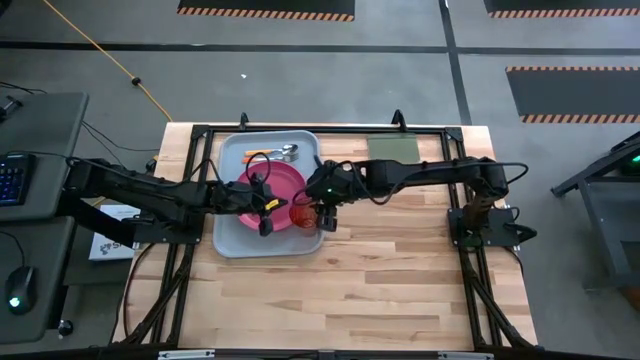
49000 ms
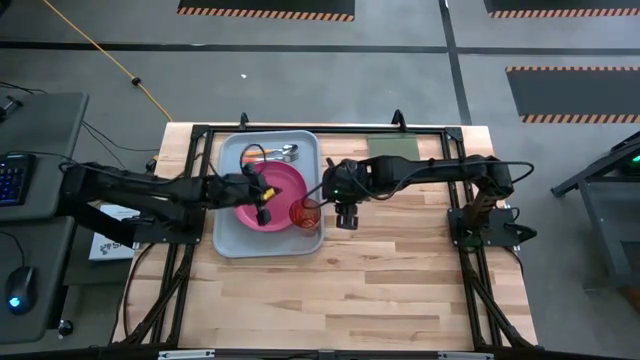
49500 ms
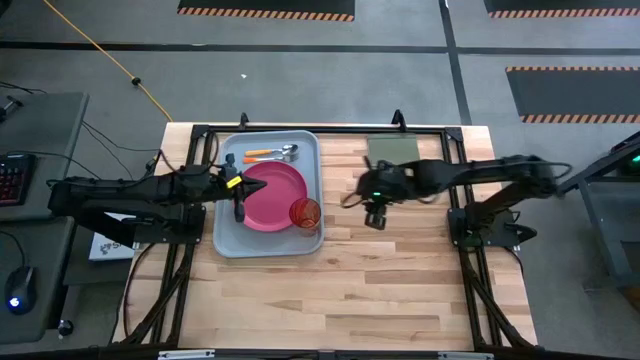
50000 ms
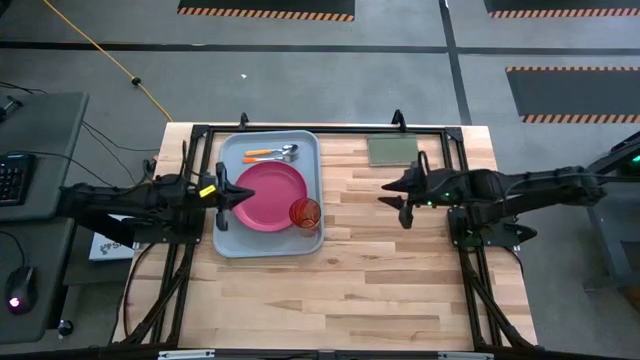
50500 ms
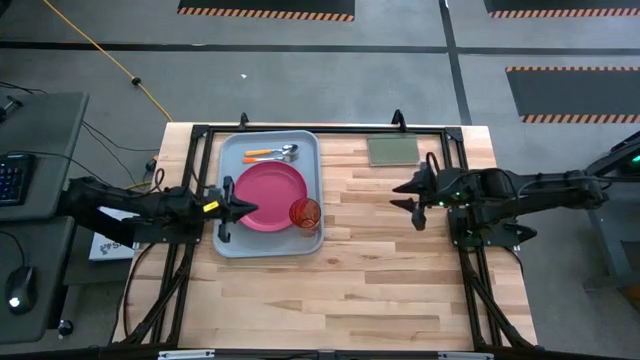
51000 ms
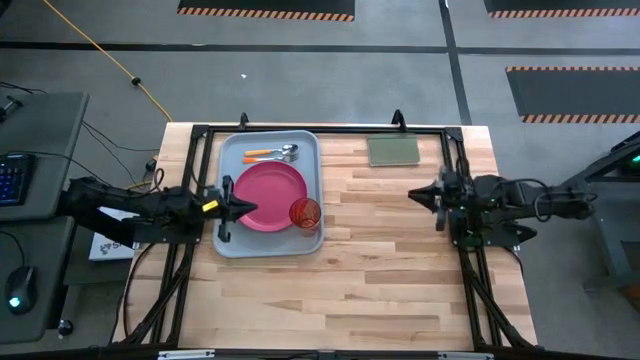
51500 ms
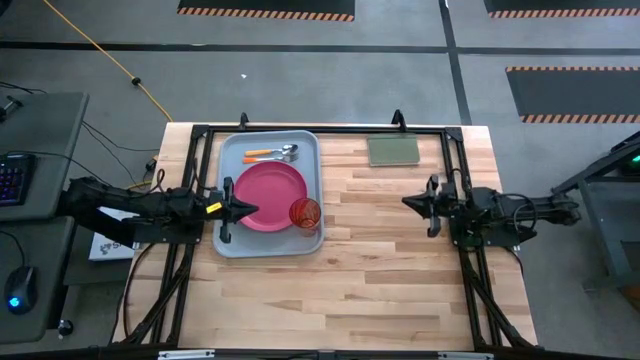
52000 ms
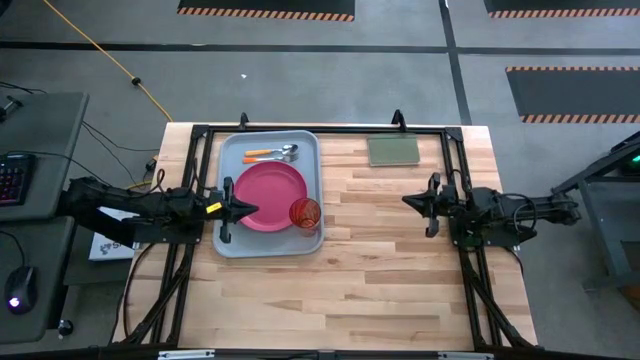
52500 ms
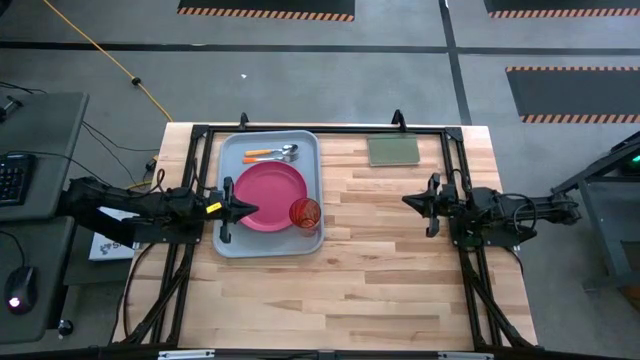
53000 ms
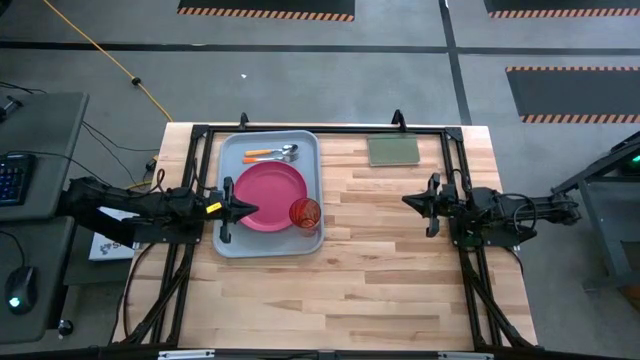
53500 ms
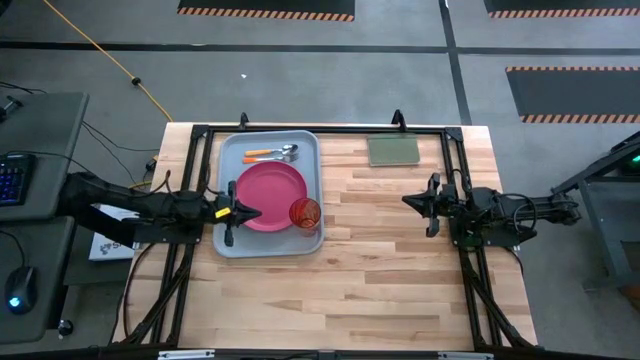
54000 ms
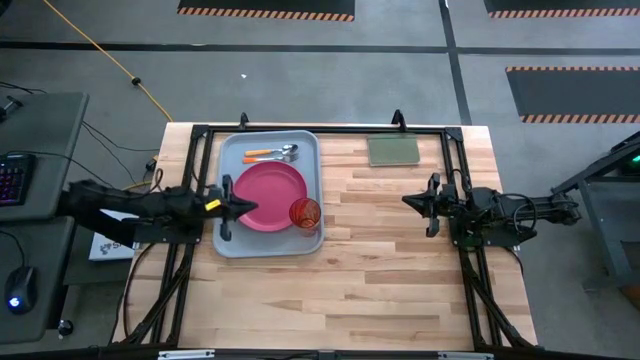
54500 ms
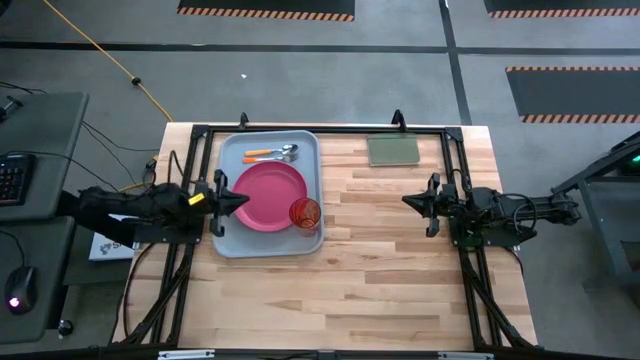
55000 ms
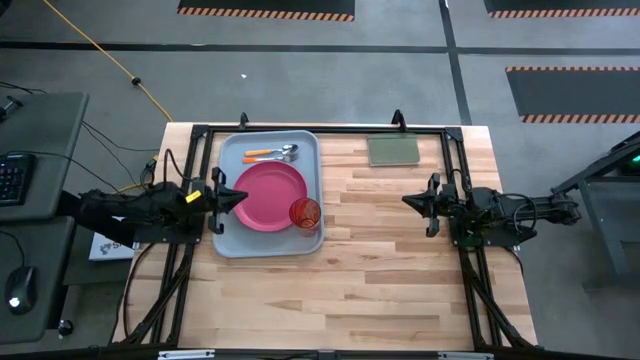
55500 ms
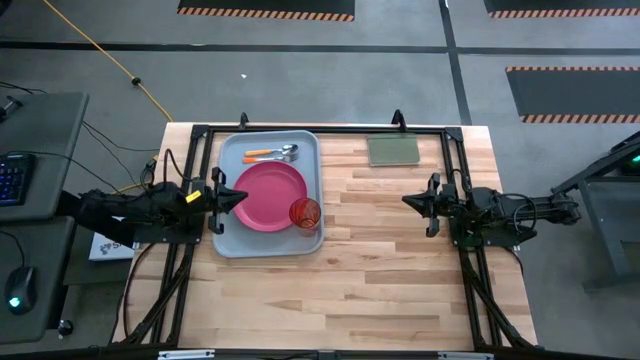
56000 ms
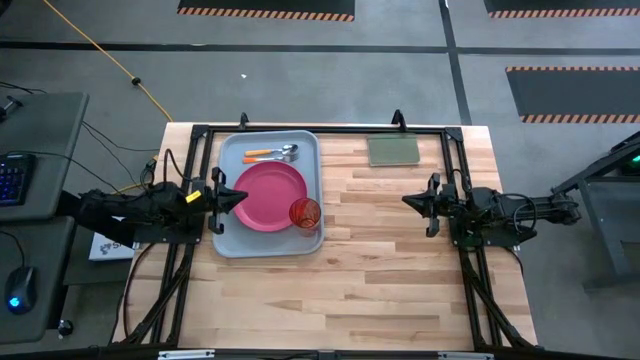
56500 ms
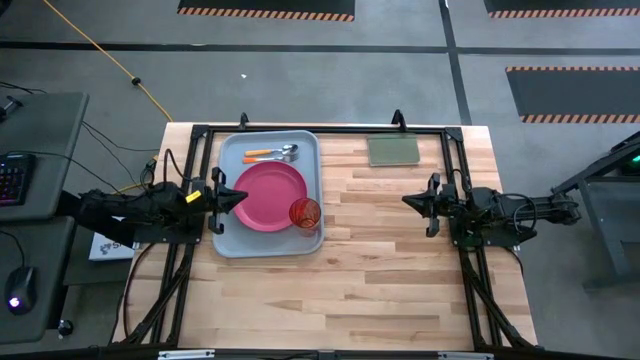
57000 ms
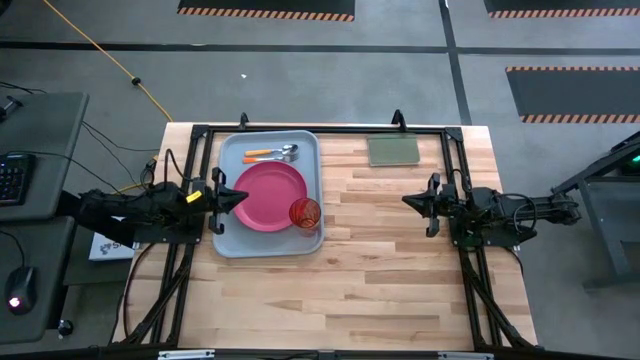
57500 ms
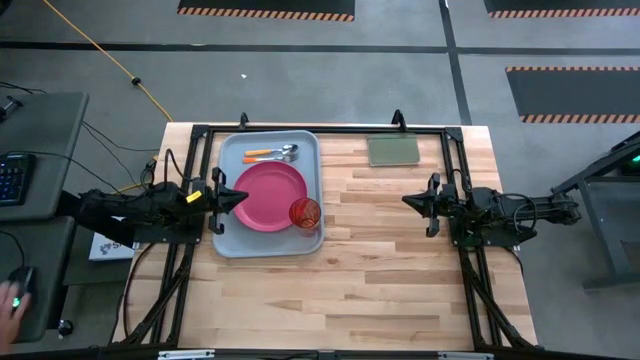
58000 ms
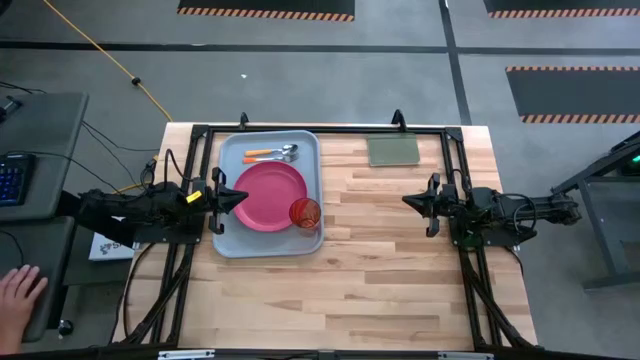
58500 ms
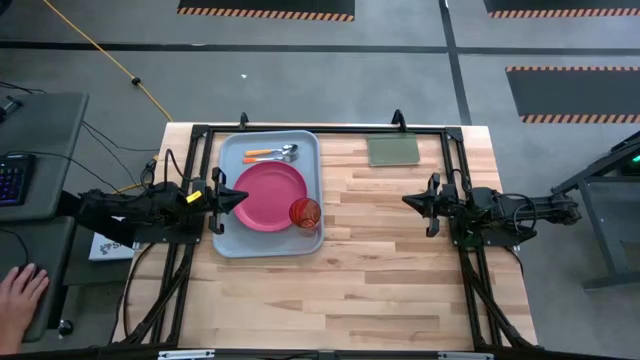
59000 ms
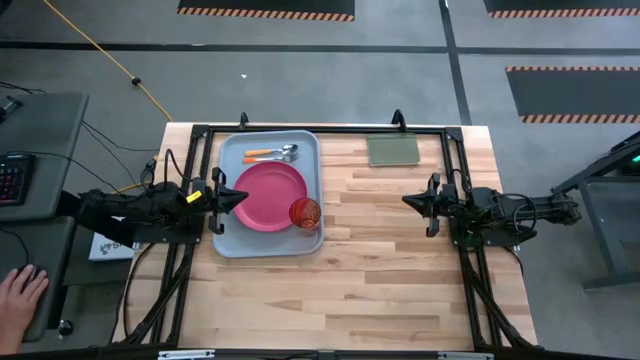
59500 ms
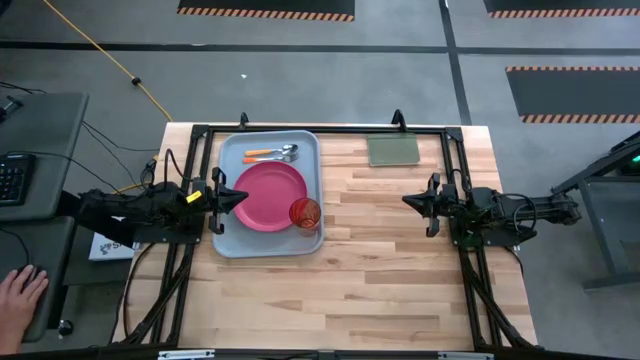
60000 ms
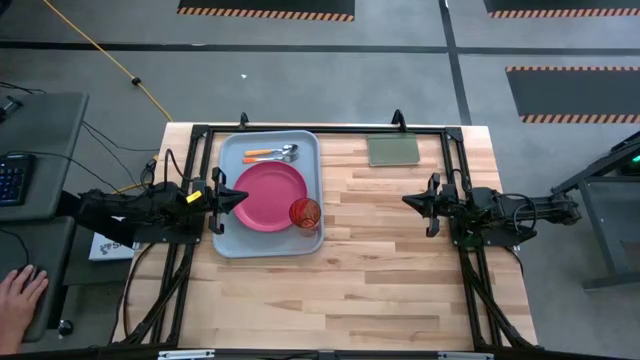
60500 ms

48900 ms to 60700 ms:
Task: Pick and place plate/cup/fork/spoon on tray
Return to Home Position

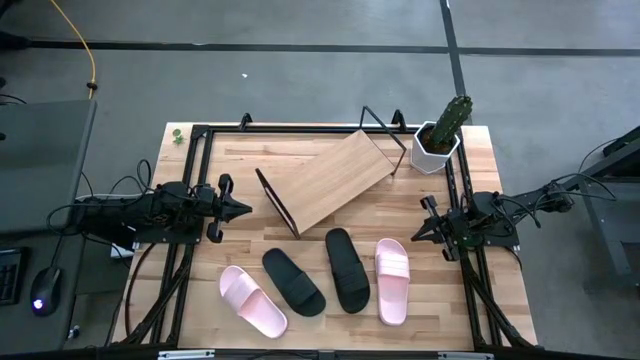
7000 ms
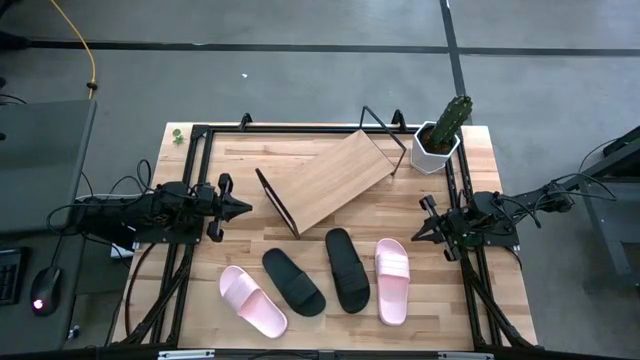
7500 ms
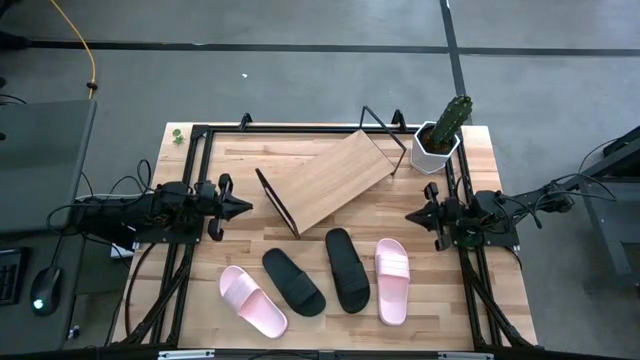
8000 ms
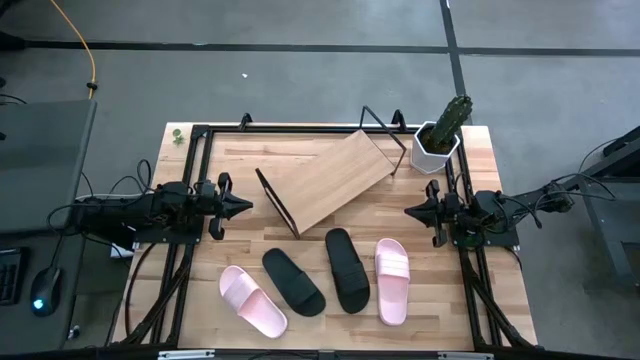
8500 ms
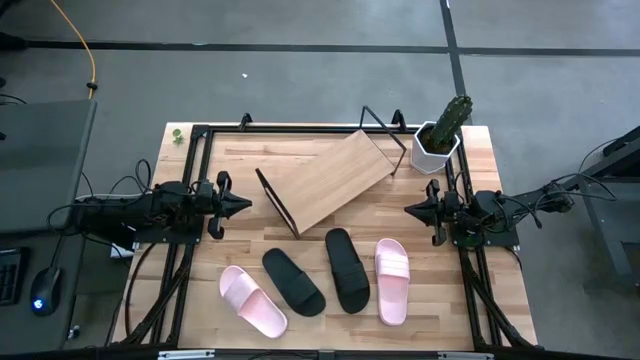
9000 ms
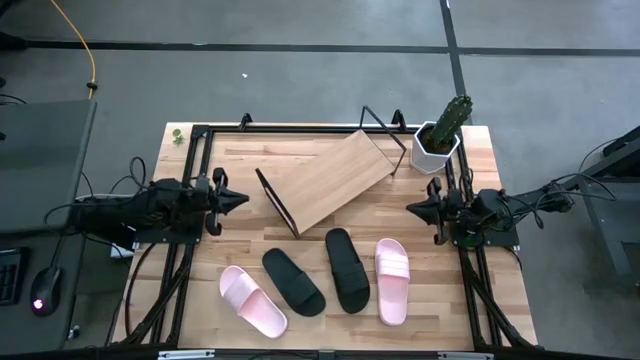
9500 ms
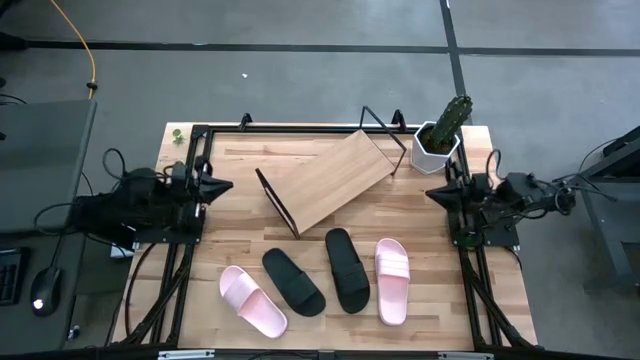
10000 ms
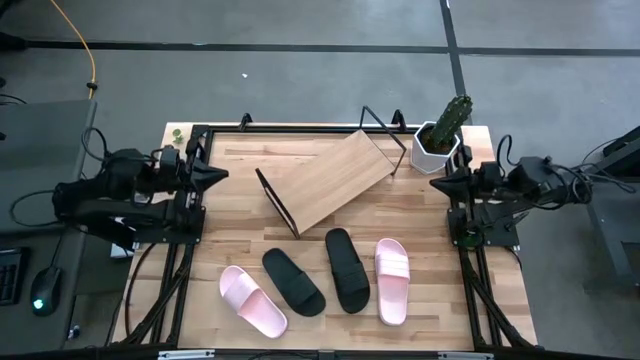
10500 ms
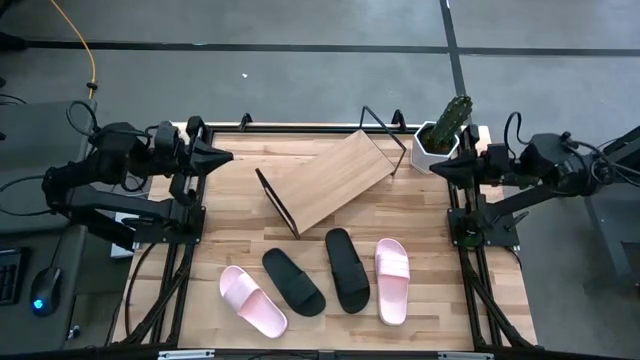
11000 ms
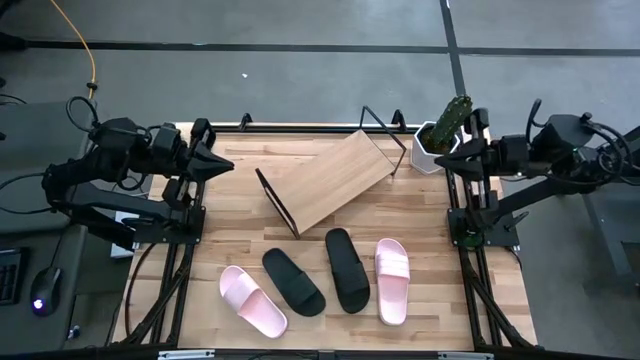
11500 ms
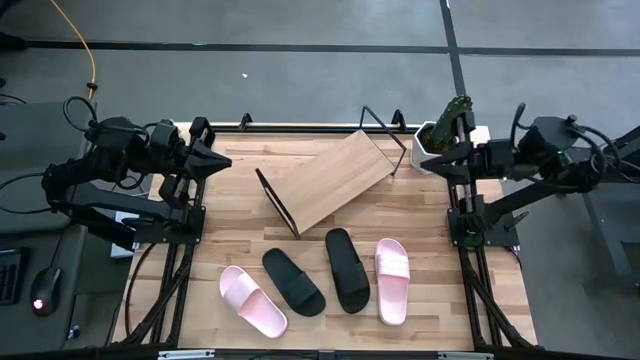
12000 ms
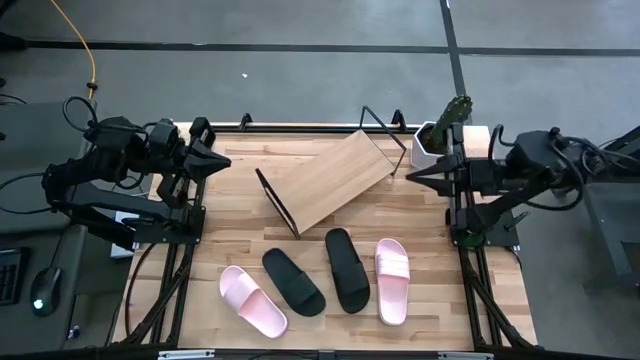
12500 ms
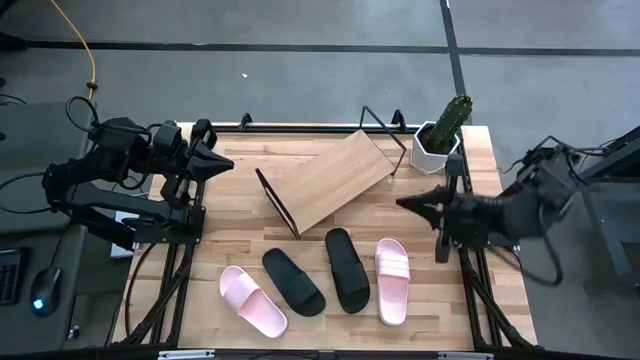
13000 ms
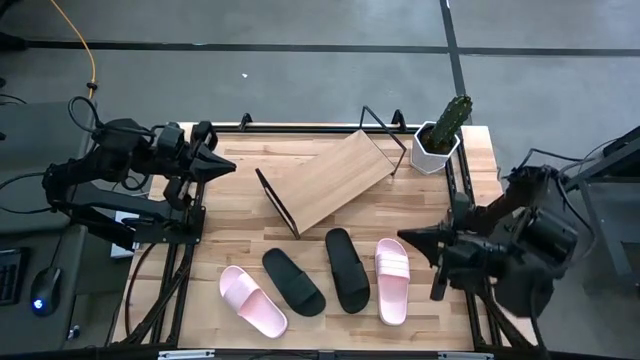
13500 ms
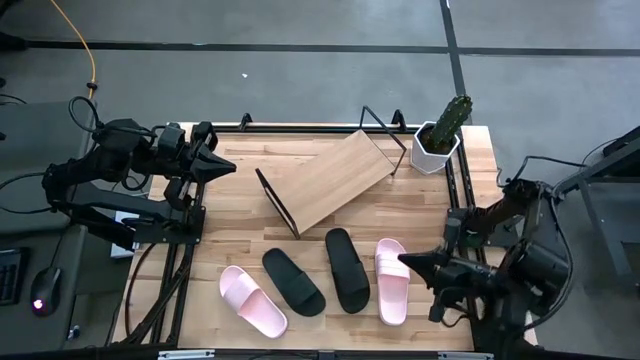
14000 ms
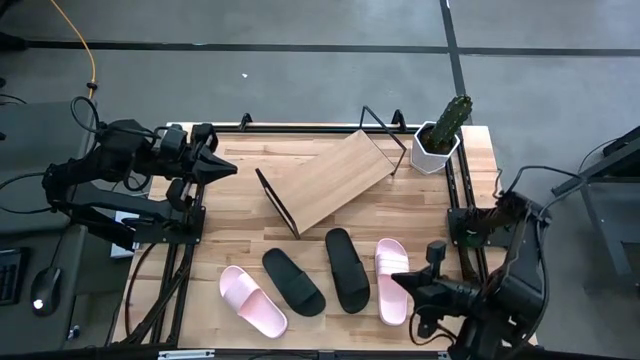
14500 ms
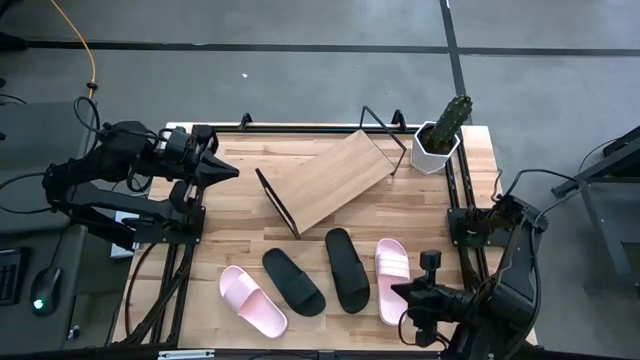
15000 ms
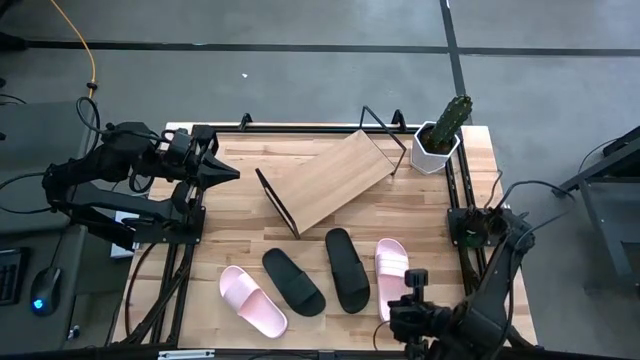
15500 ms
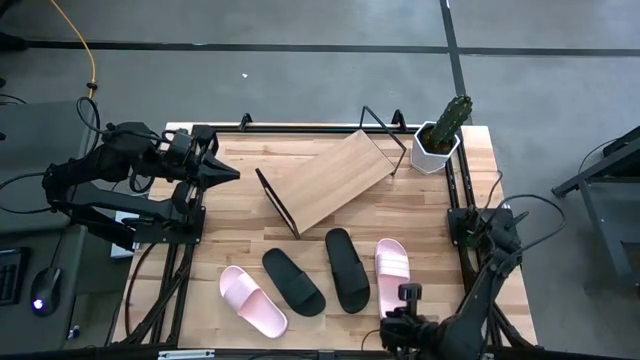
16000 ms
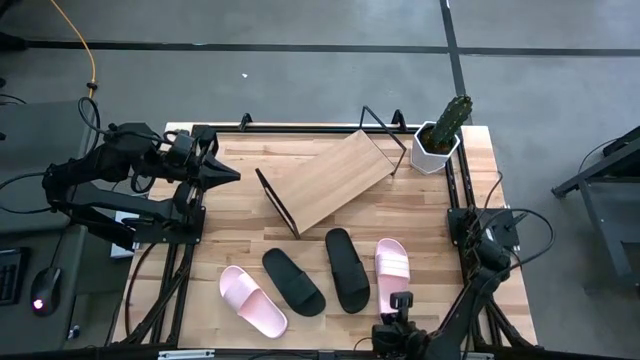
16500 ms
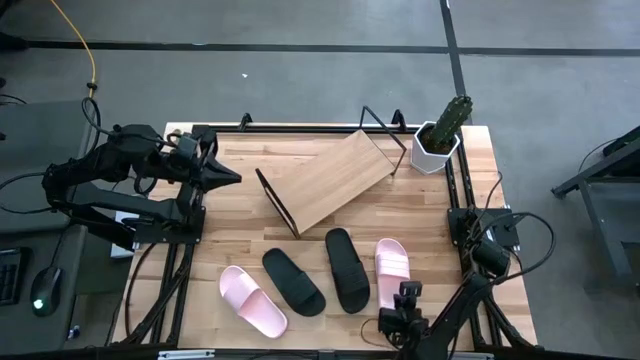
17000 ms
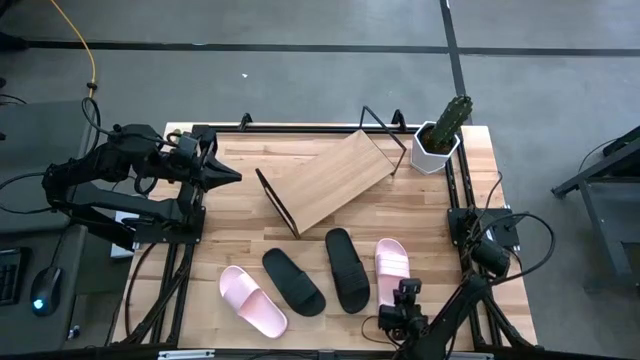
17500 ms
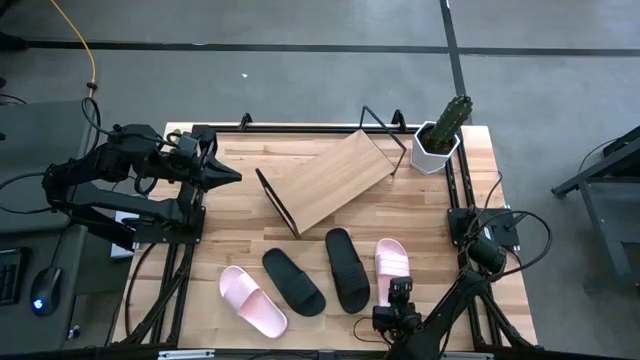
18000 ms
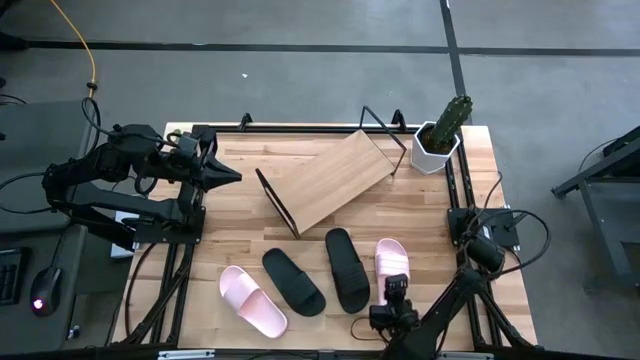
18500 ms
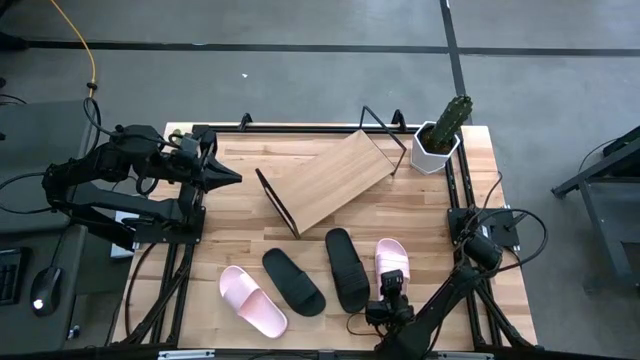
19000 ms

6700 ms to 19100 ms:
Task: Pick and place slides into the shelf
Put the right pink slide on the shelf
